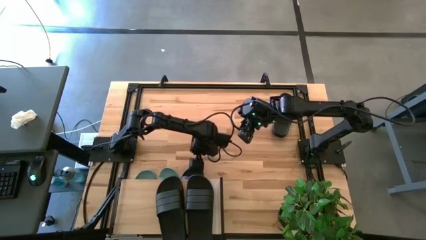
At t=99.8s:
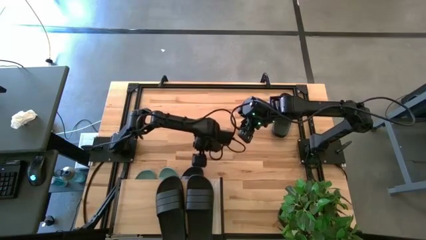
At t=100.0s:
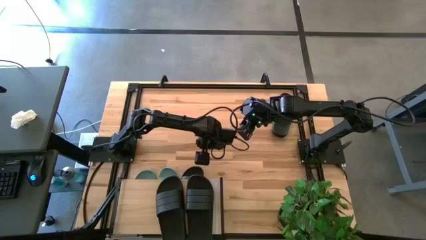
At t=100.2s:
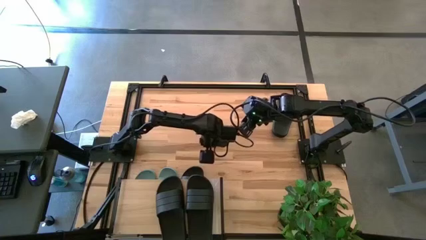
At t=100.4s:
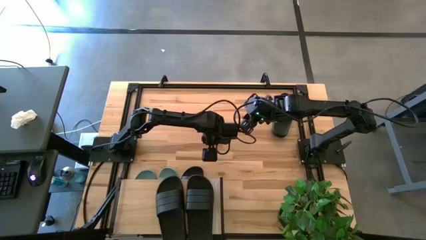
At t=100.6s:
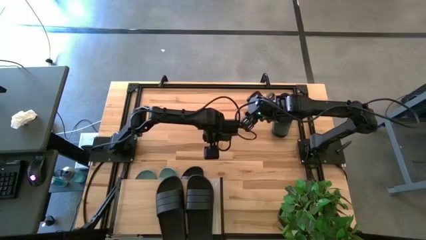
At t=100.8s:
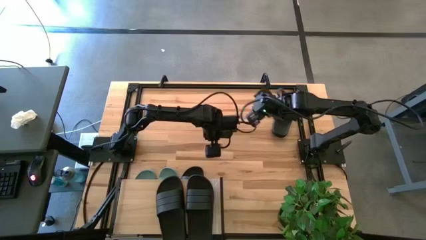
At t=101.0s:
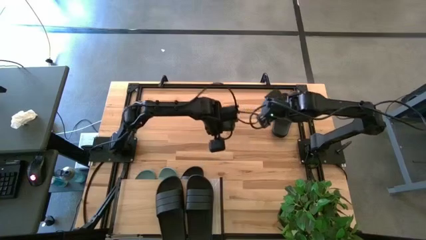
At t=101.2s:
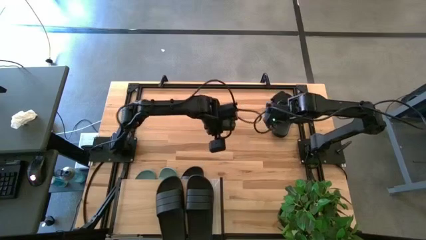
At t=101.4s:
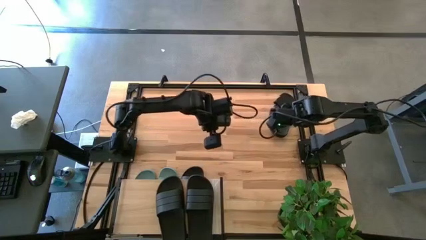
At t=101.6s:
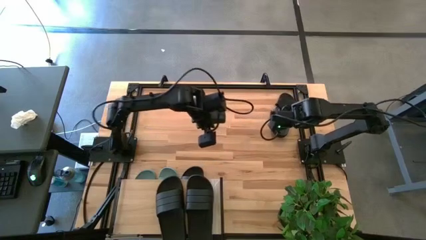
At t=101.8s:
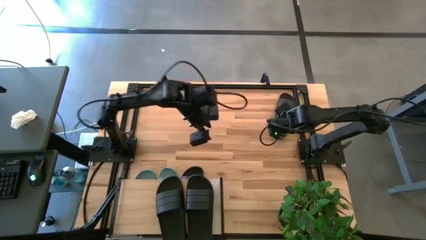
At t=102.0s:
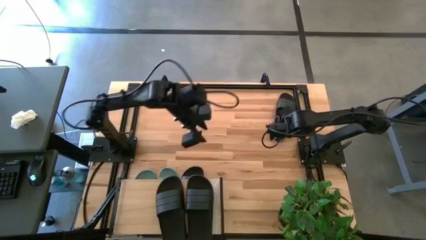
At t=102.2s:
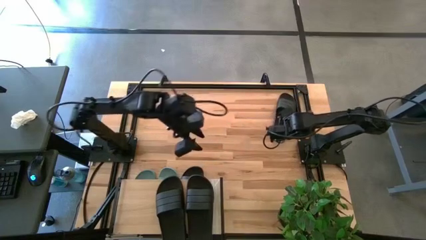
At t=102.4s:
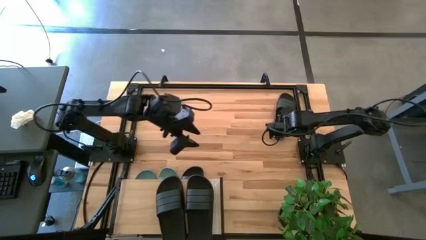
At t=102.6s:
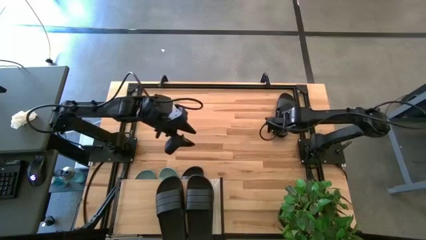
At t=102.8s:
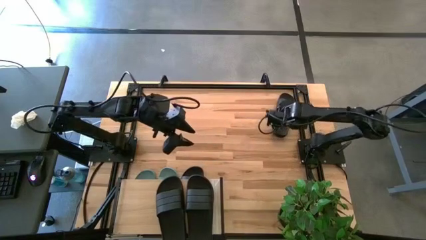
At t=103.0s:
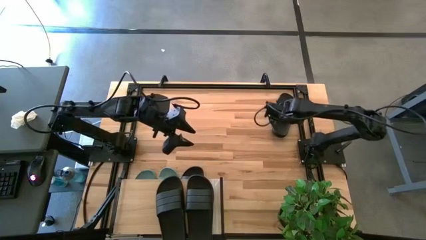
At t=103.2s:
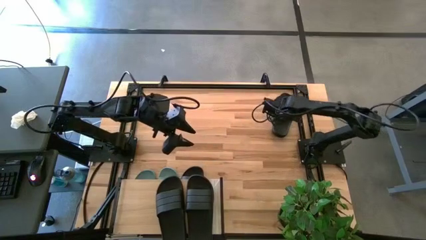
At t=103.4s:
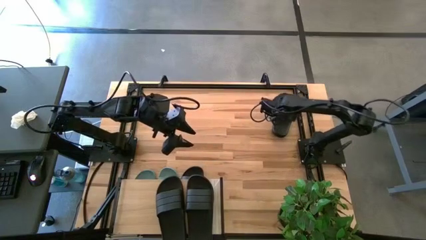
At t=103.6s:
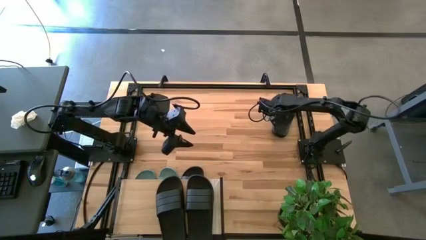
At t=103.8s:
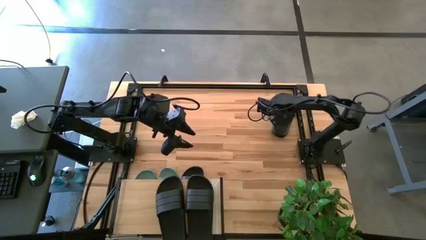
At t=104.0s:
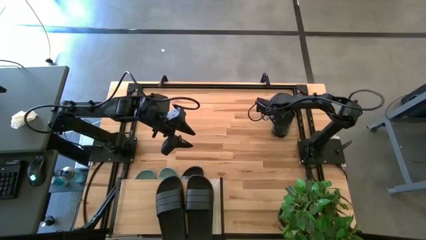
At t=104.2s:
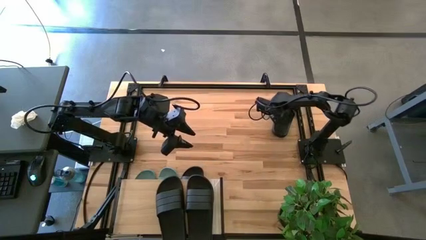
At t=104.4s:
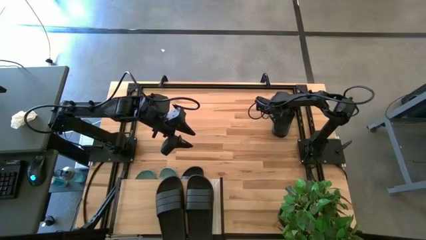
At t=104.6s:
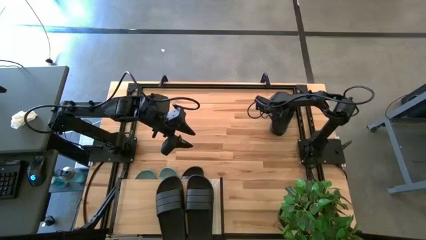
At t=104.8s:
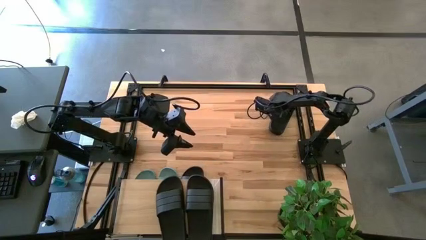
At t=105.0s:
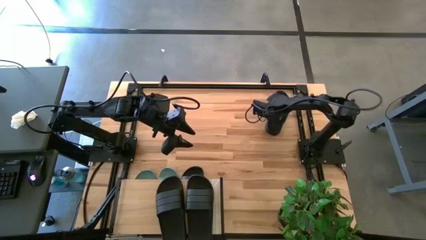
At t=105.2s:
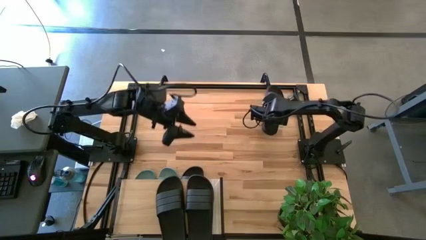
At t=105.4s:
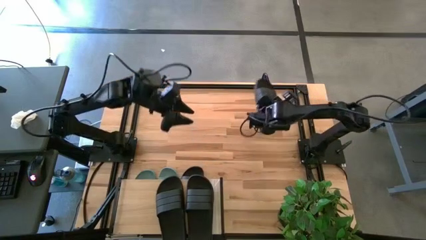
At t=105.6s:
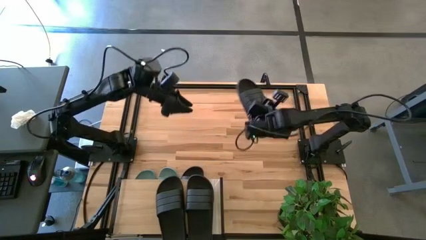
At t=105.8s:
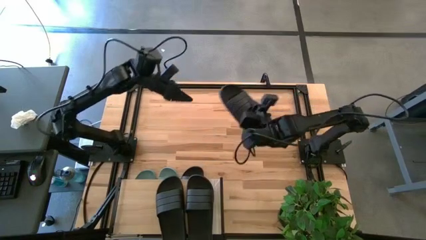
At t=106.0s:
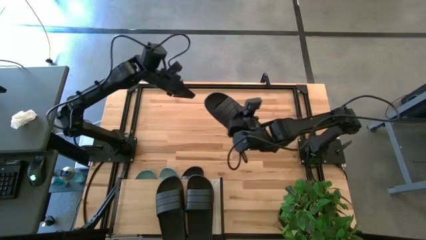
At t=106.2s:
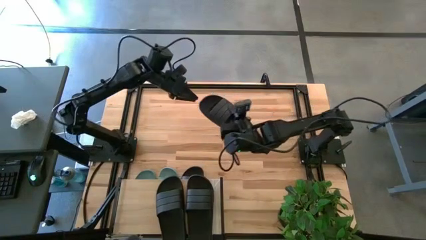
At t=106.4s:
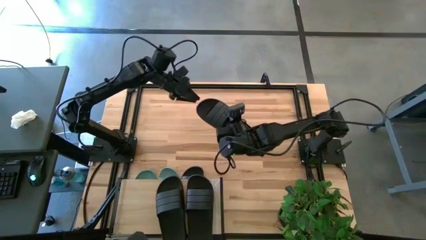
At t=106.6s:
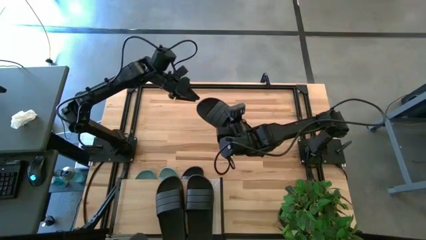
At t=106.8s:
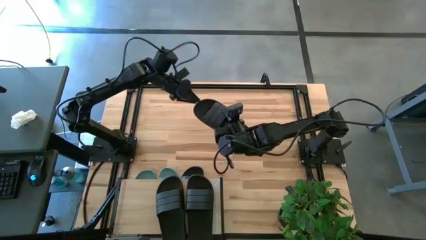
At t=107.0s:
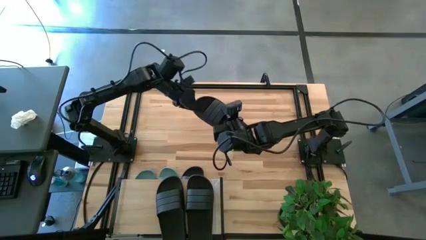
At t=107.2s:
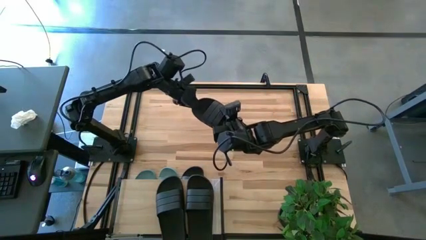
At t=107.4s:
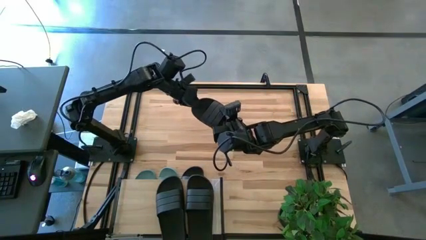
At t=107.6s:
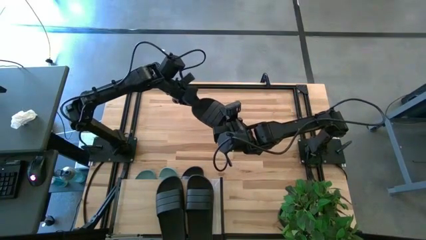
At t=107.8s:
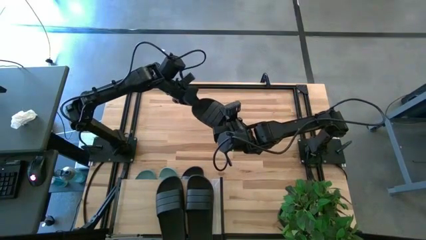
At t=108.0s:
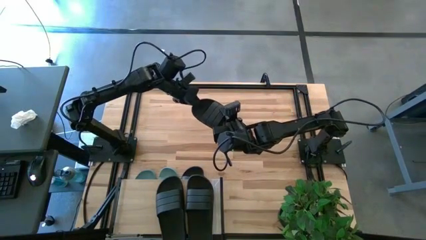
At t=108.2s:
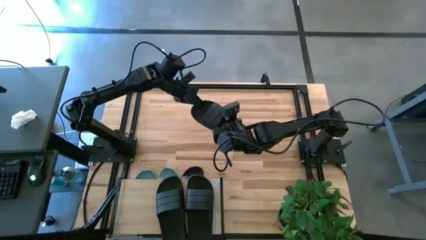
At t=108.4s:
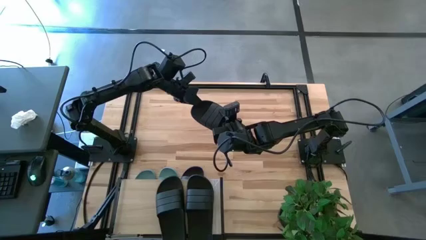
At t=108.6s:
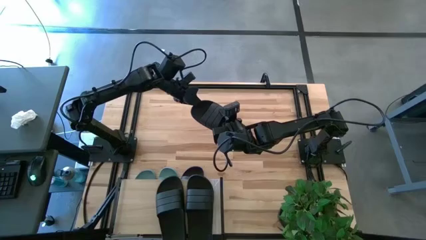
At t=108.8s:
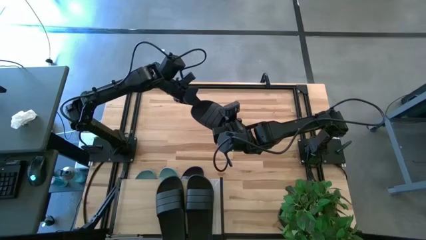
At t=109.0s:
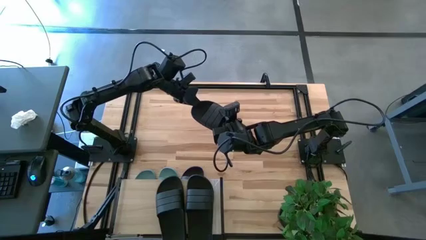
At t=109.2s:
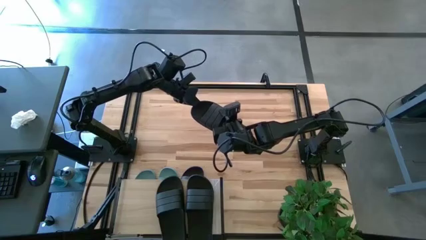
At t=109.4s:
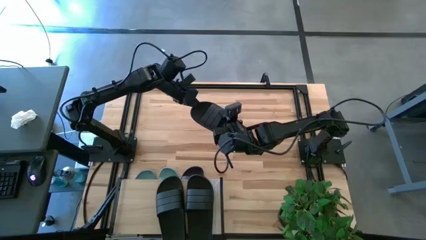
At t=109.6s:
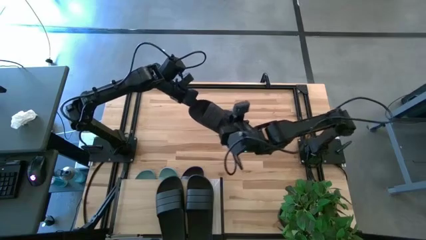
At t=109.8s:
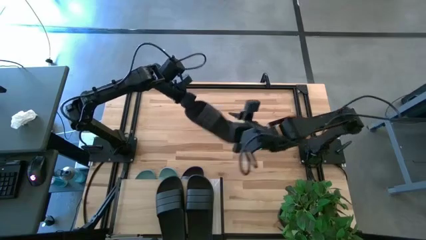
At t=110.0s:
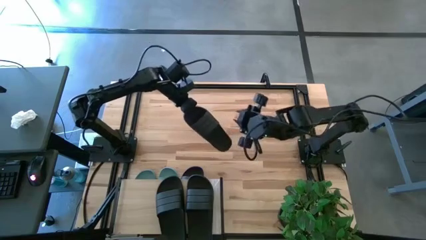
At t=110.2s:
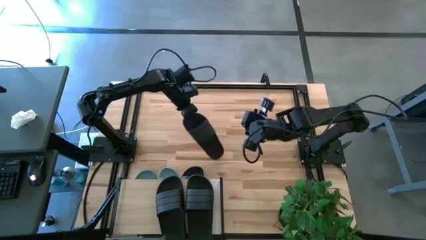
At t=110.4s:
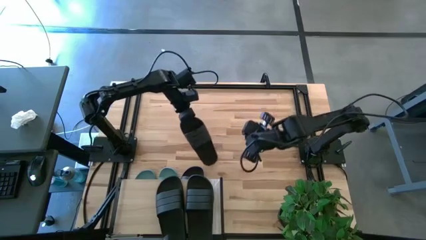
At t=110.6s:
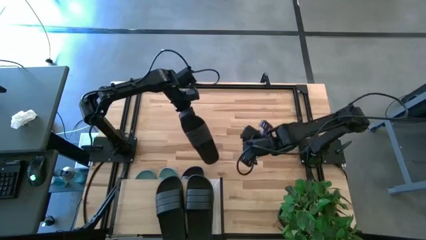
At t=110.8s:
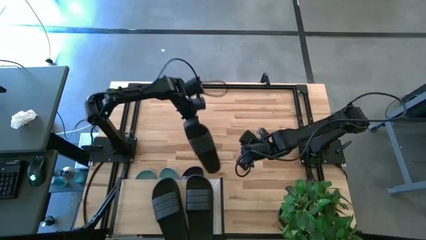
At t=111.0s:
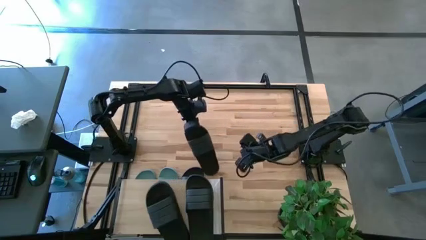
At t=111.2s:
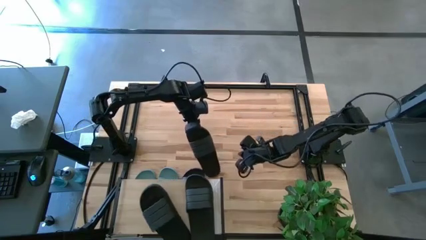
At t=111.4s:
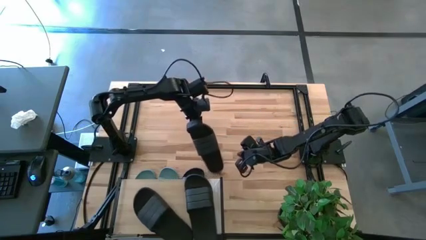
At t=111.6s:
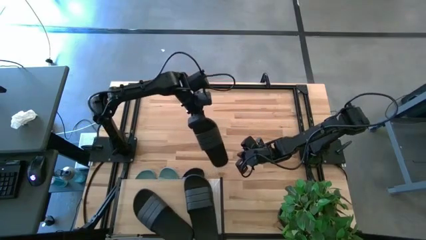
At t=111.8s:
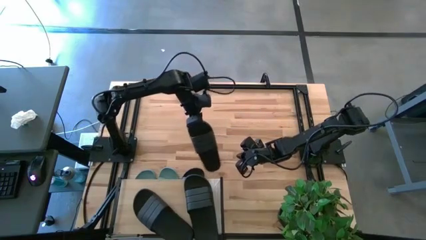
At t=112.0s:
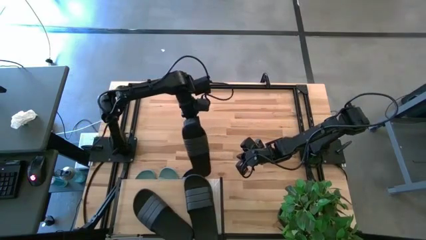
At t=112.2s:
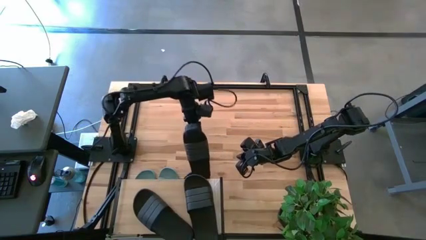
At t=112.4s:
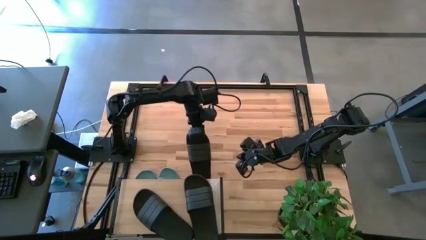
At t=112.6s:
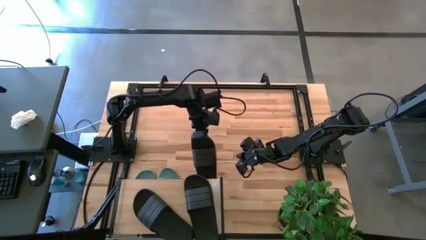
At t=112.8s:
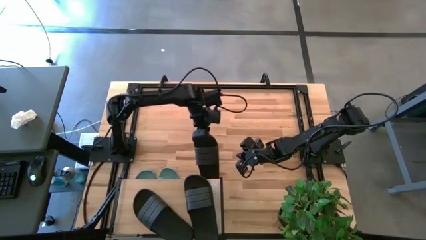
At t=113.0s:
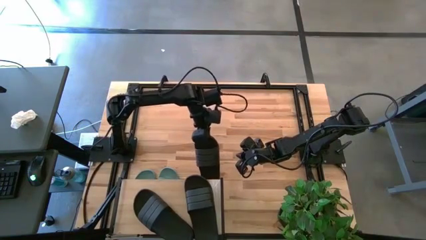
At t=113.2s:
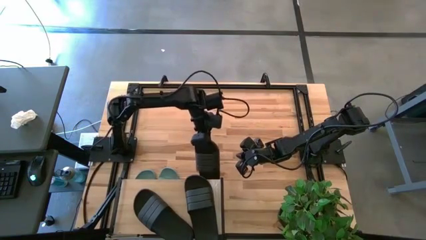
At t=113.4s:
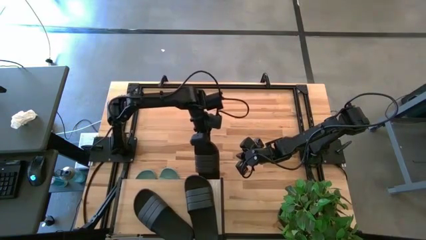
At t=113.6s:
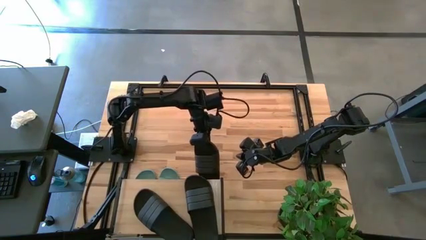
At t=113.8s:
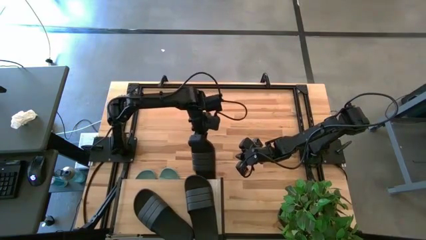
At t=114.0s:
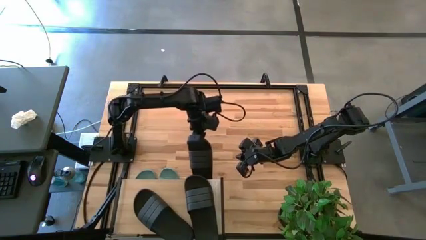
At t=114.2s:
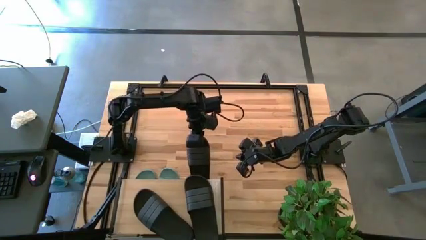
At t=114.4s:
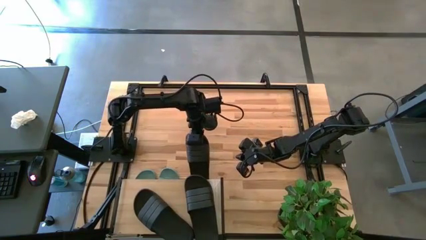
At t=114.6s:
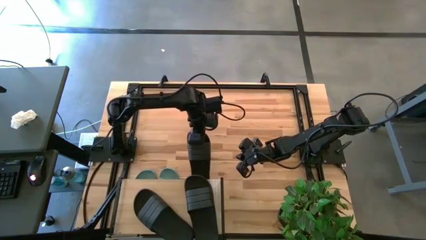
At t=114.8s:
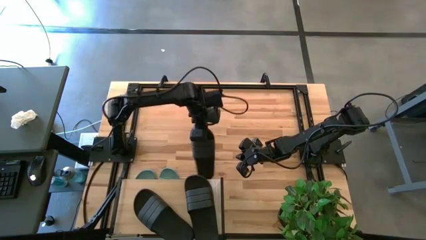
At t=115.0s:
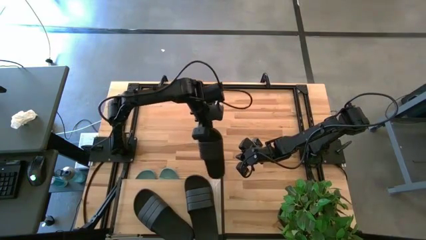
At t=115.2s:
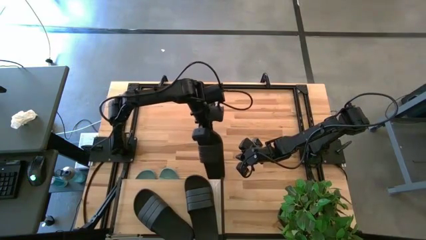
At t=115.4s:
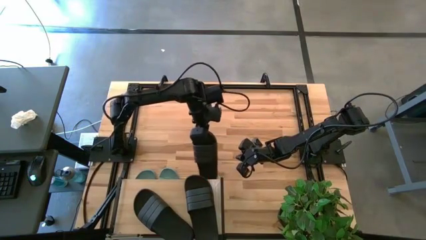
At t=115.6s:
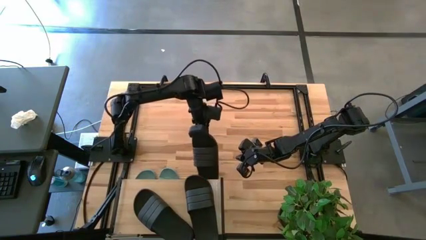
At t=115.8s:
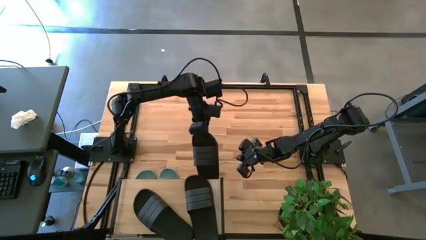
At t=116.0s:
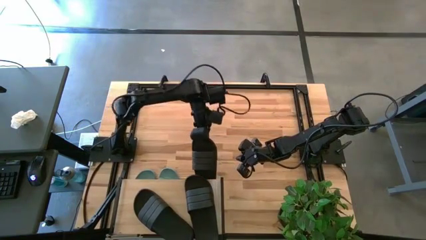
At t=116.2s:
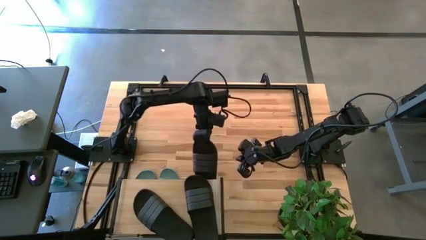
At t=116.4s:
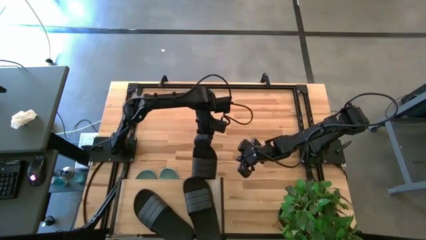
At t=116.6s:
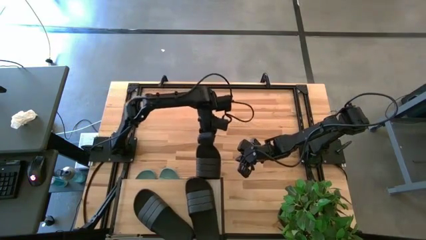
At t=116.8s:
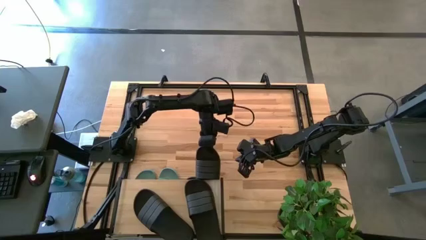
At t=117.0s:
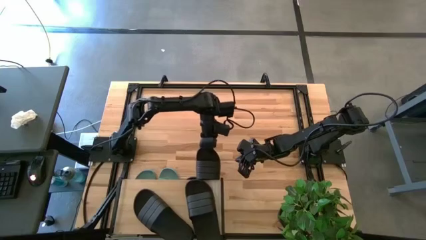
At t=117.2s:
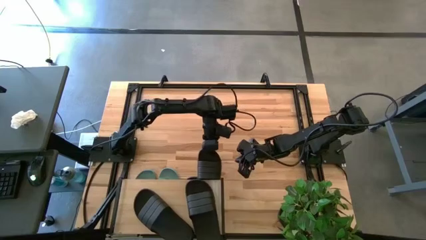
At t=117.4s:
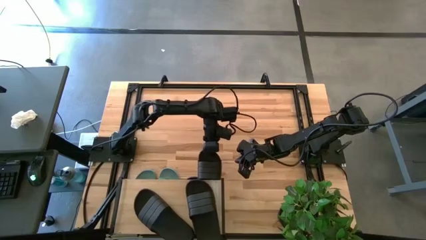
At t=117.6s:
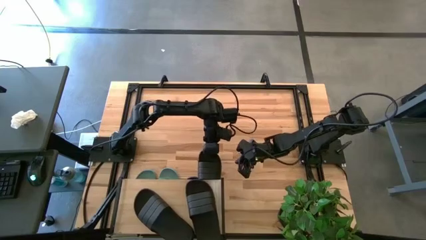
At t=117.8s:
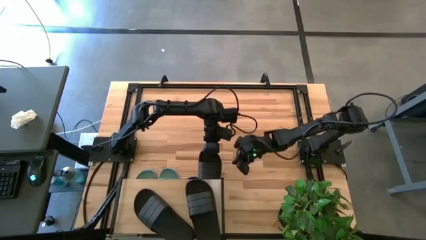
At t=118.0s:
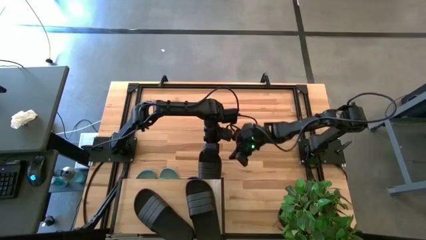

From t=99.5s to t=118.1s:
Task: Pick and place slides into the shelf
Put the black slipper under the shelf
